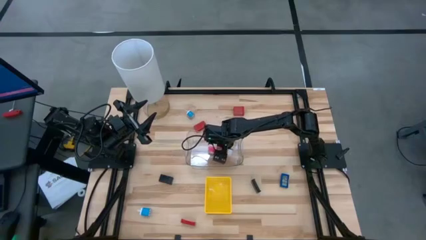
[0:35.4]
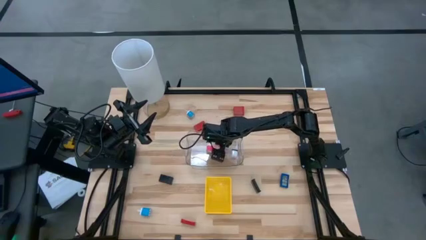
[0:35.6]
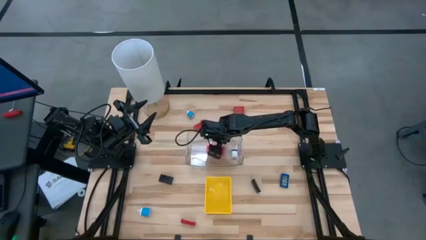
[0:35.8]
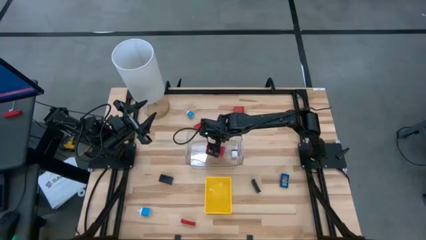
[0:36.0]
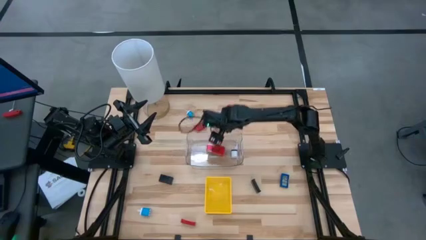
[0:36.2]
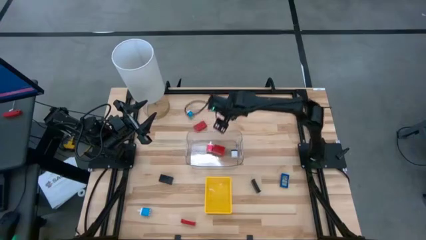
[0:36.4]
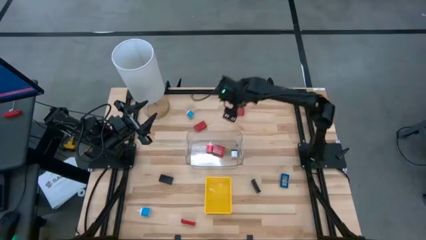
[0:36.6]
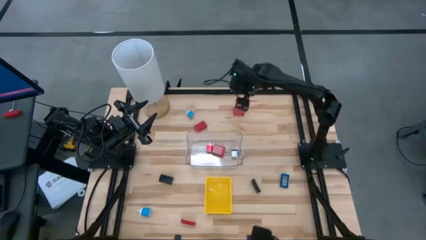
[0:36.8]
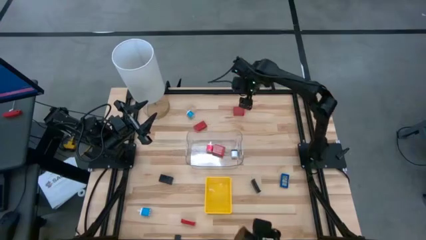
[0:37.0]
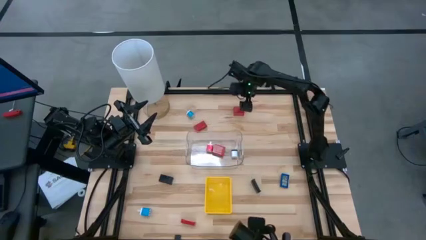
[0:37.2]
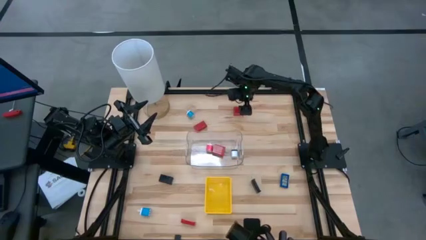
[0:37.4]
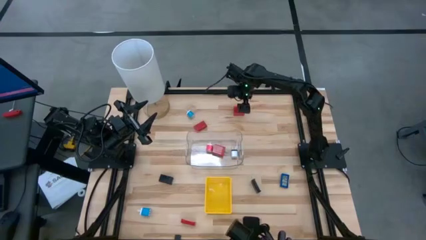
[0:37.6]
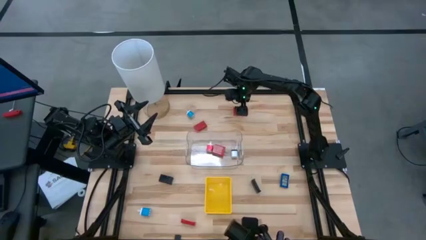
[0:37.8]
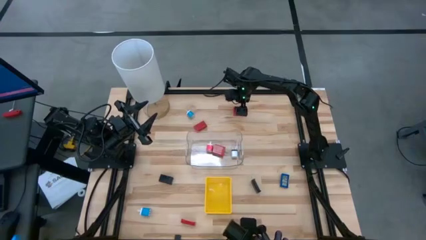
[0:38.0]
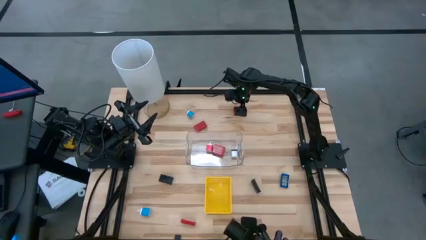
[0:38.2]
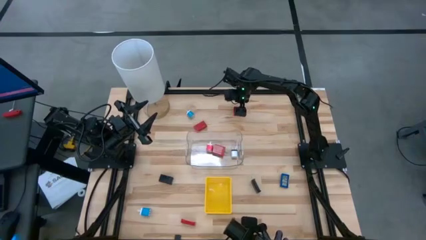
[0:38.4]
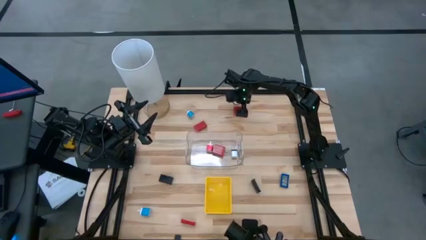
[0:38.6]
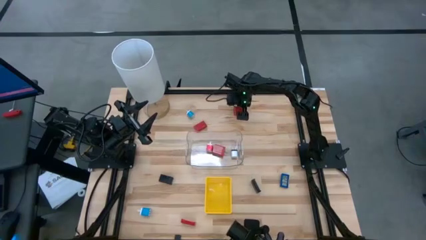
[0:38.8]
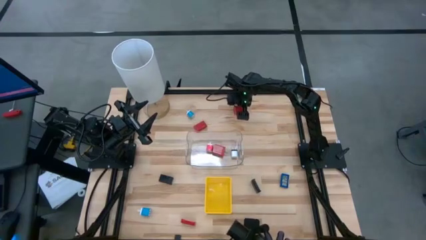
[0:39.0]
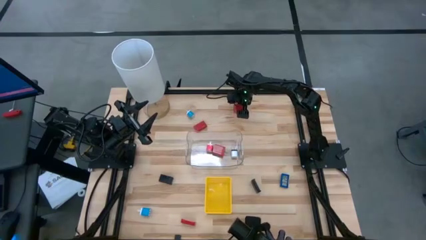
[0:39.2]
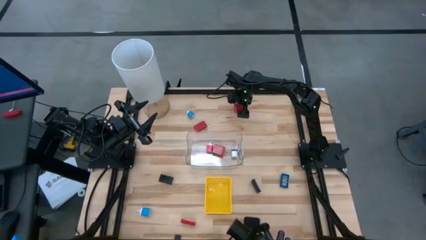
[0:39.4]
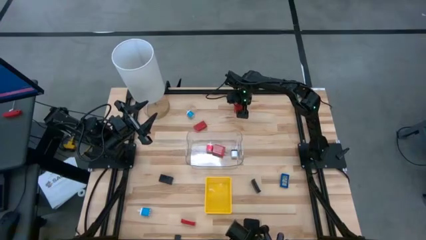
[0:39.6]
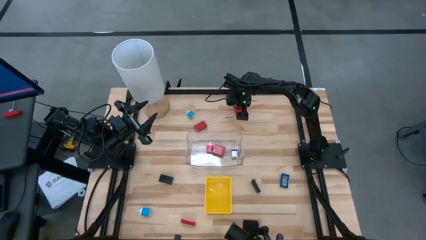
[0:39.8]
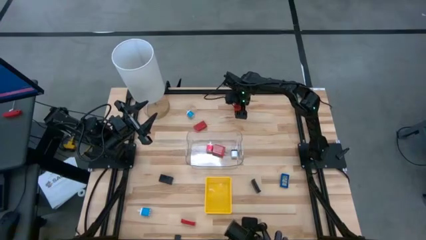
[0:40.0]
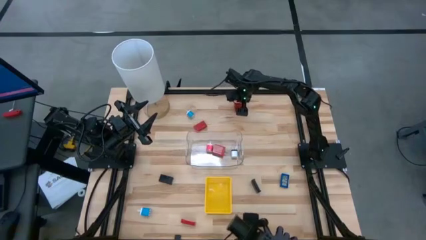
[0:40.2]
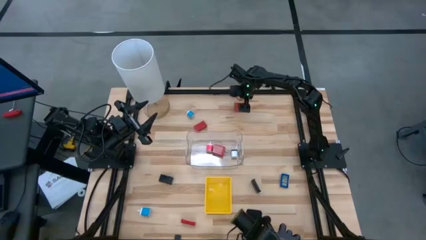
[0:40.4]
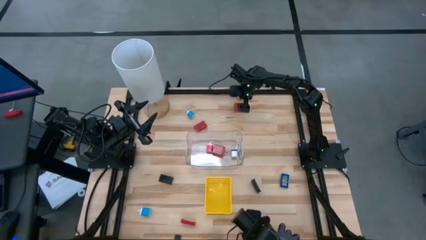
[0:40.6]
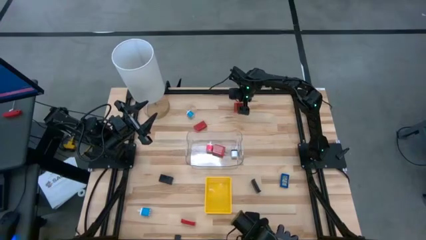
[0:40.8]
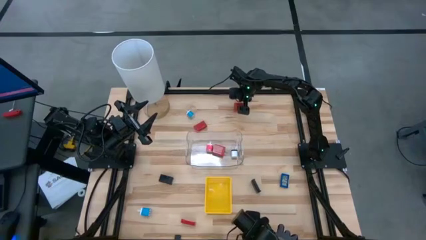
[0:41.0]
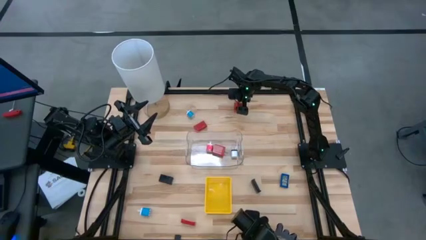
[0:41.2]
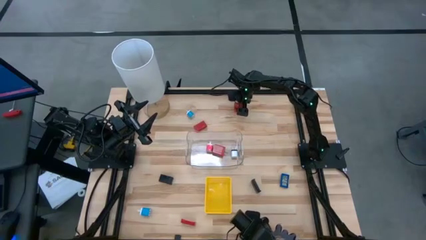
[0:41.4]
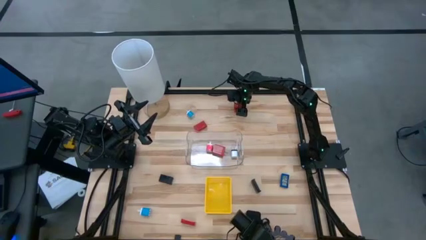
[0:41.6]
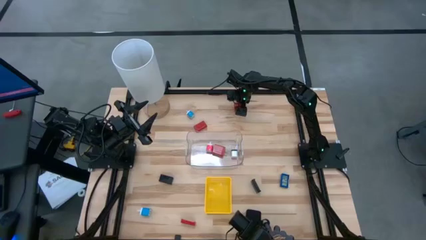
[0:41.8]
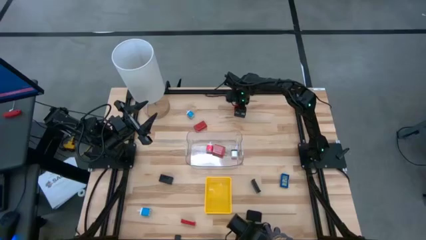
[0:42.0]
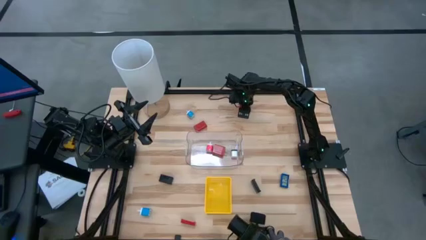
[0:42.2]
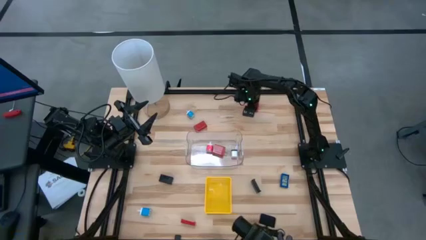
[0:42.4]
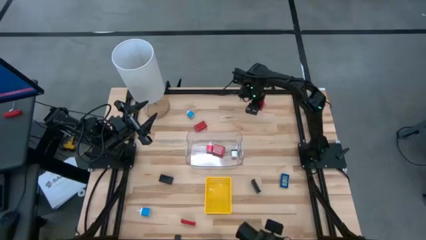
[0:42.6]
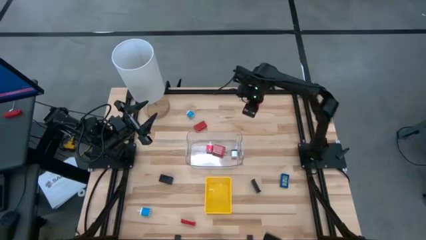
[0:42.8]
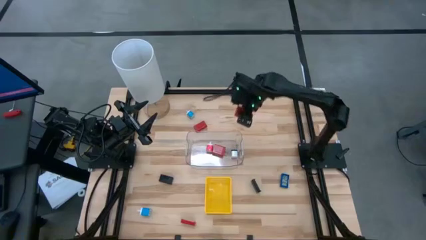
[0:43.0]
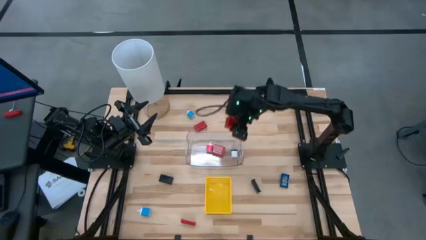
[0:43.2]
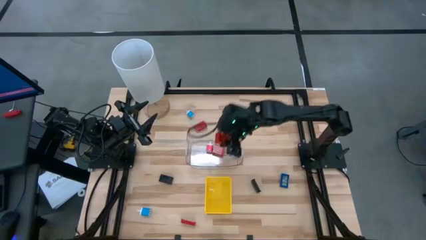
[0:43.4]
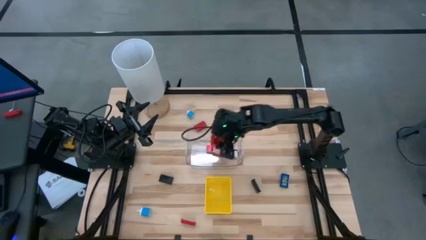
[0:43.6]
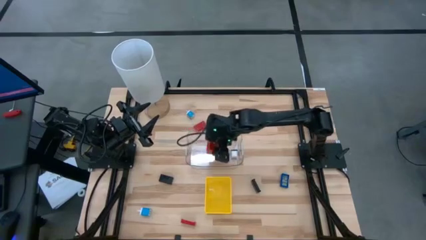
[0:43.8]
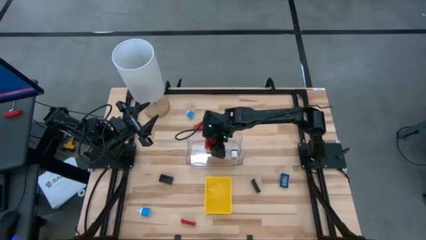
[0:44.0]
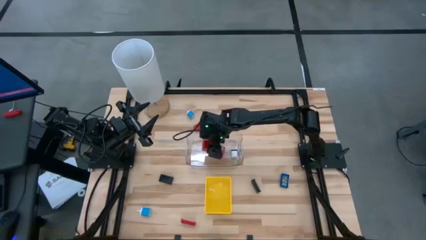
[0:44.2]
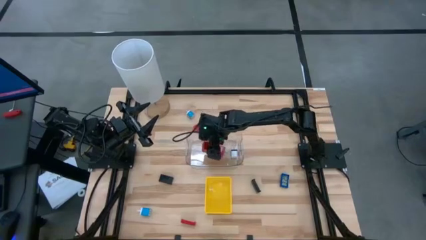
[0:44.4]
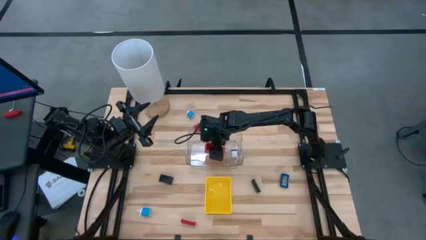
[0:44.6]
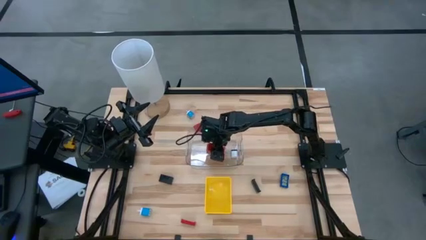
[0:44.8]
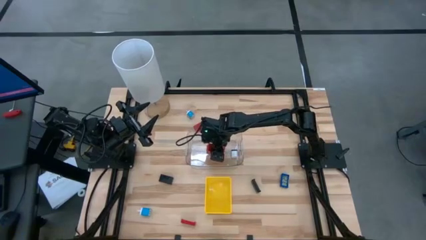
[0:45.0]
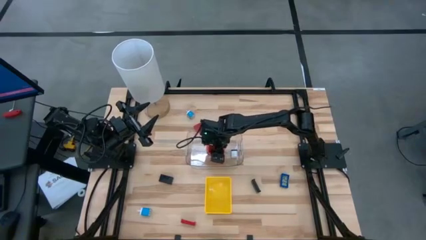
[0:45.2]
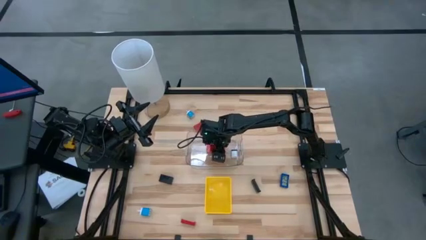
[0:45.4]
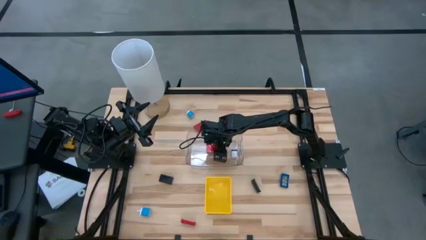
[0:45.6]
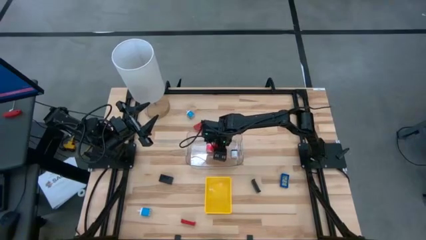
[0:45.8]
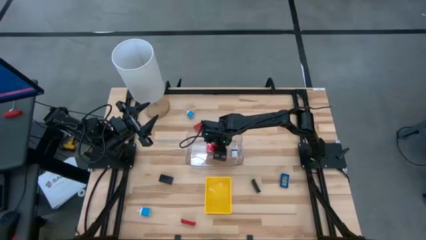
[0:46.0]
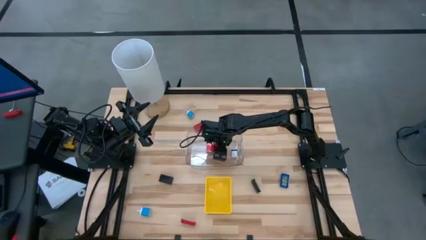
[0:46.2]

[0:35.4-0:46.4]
Task: Pick & Place Office items
Put the red charger adapter into the transparent bin
